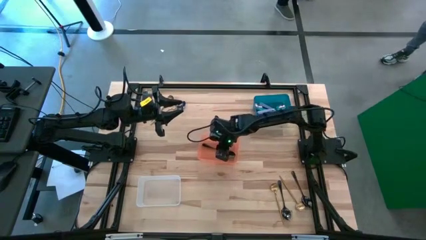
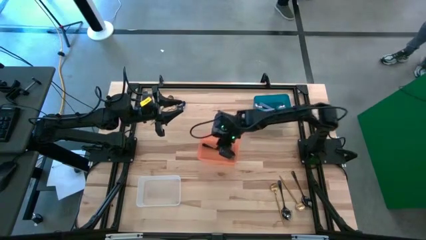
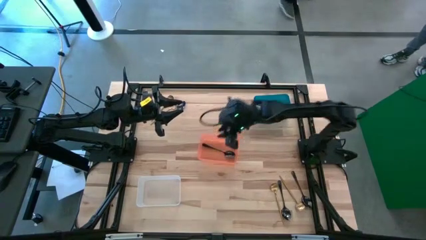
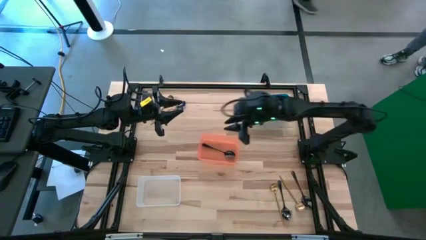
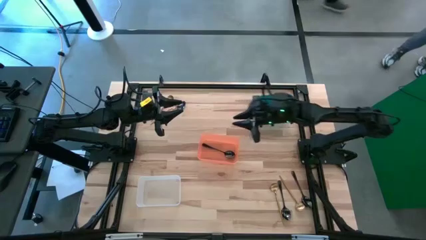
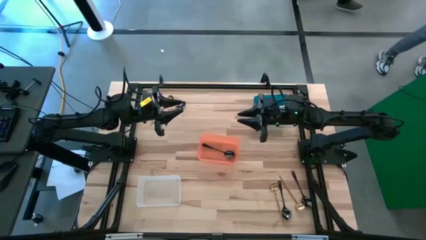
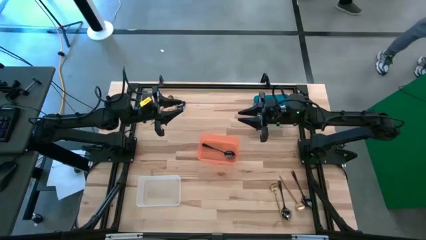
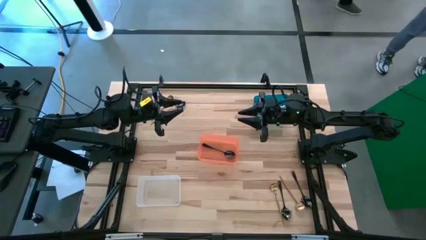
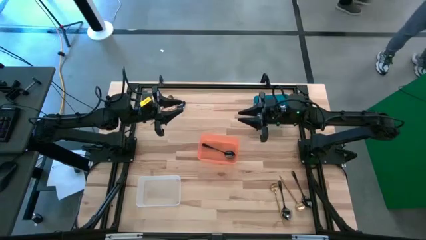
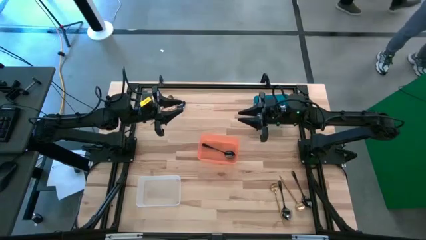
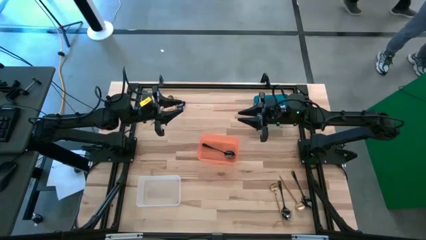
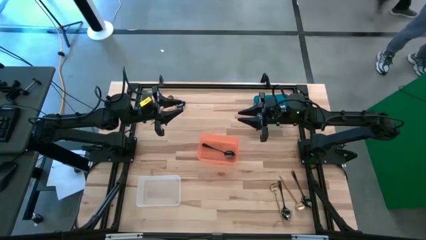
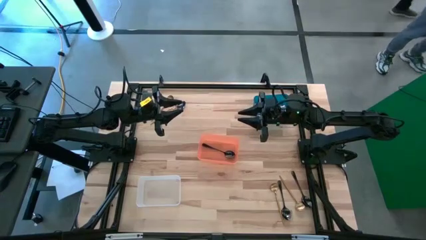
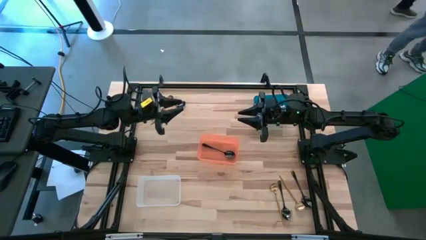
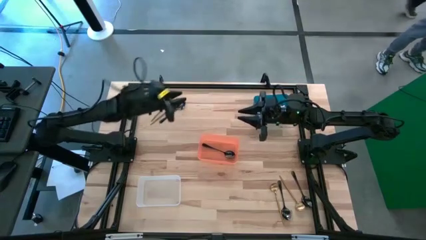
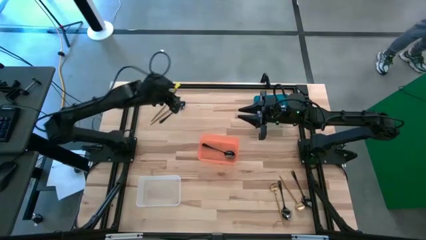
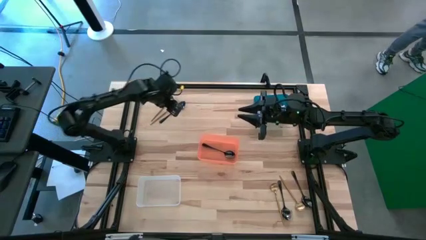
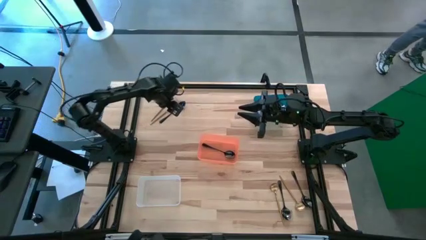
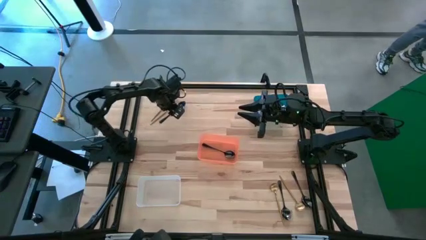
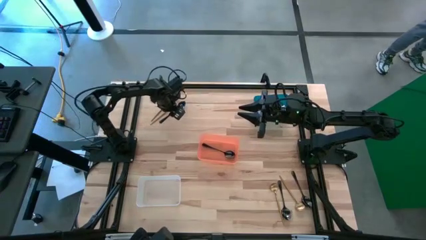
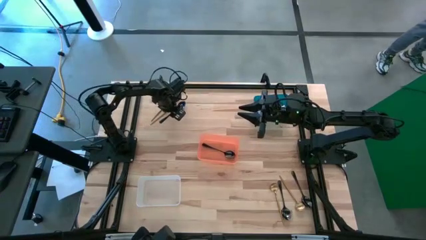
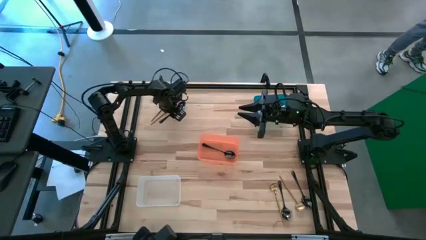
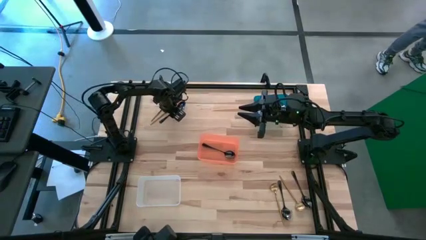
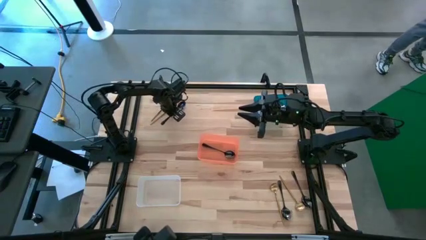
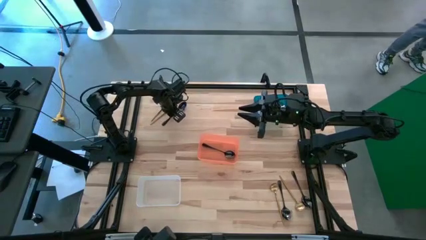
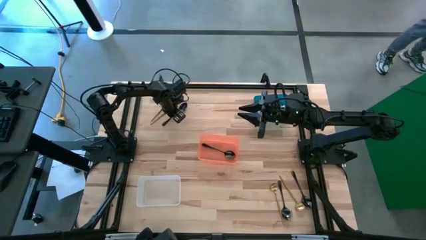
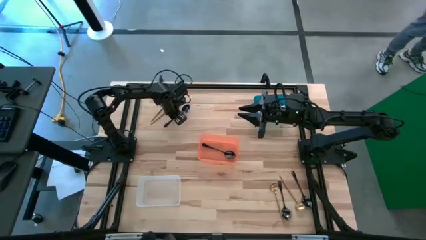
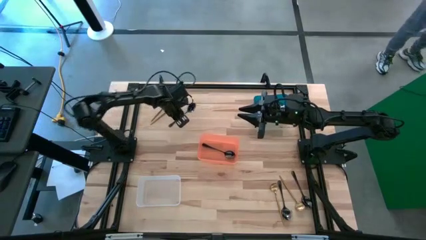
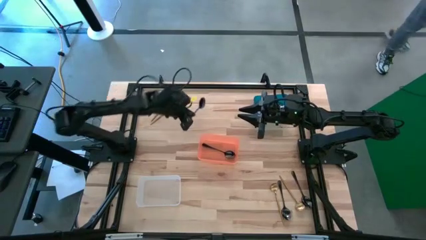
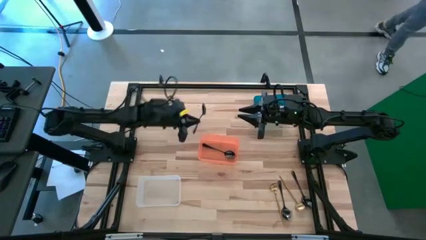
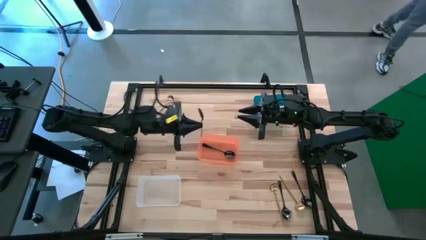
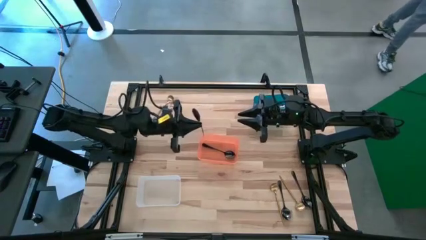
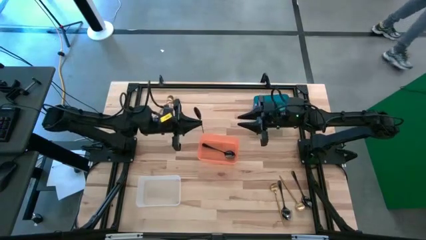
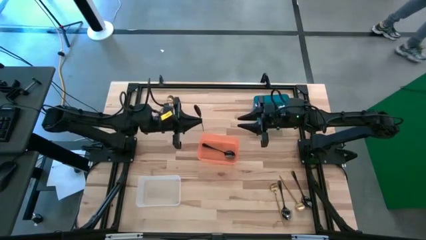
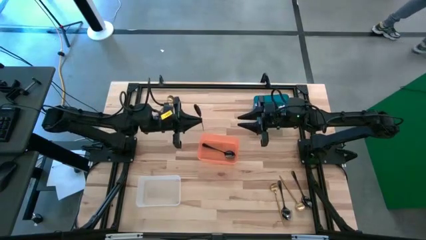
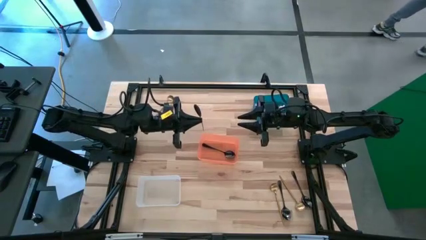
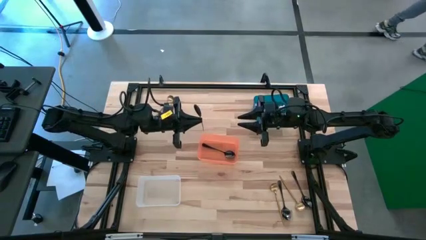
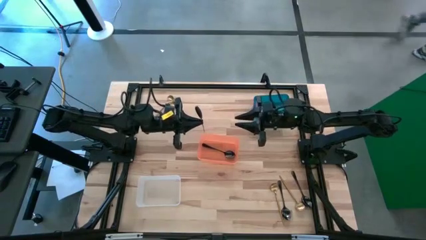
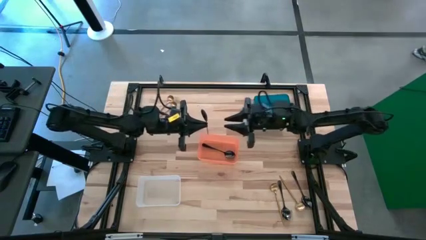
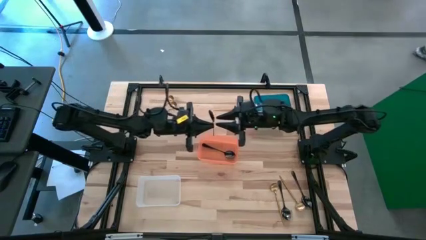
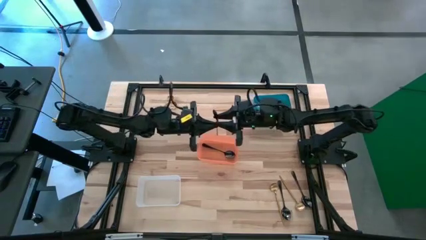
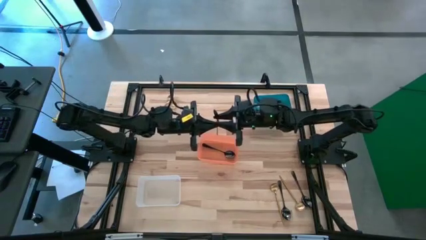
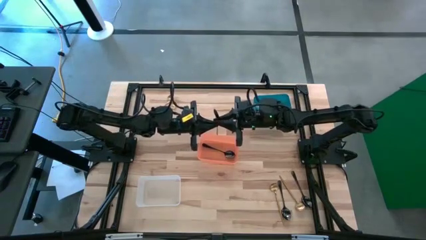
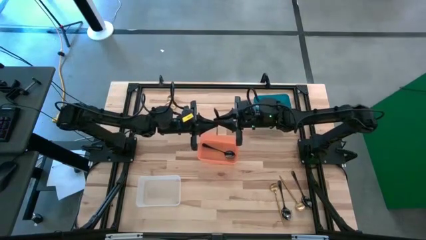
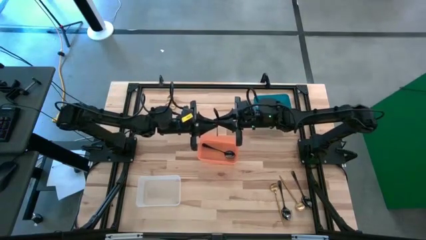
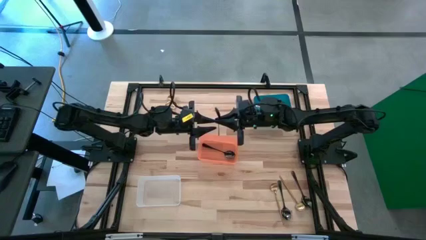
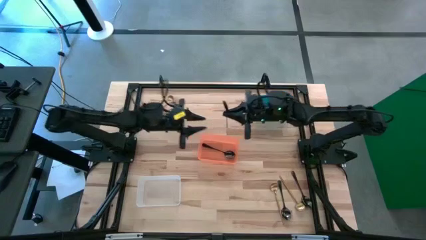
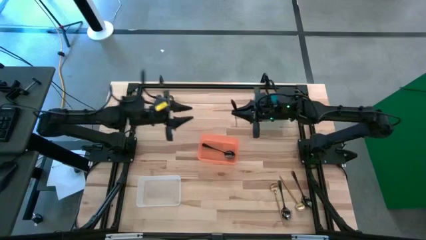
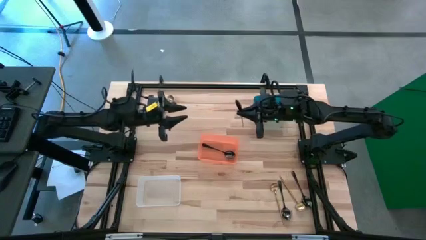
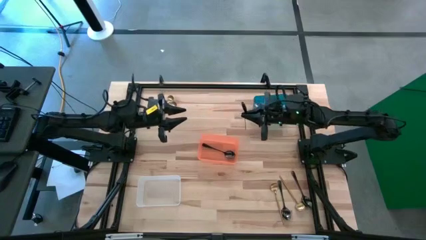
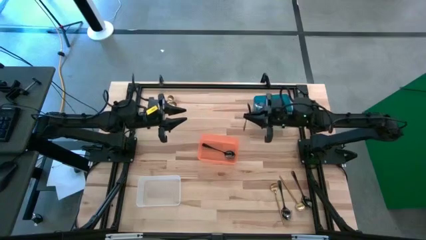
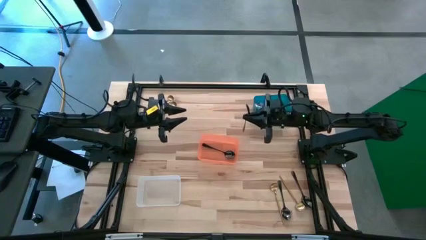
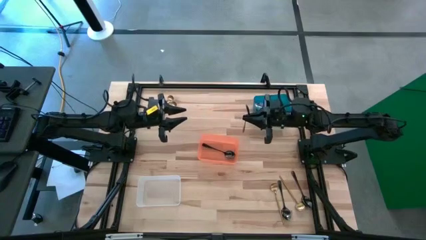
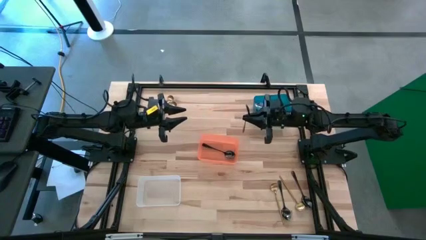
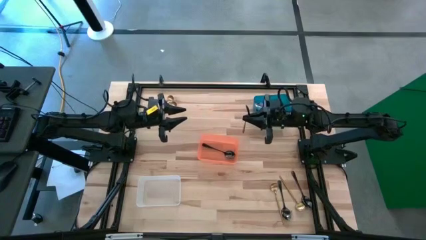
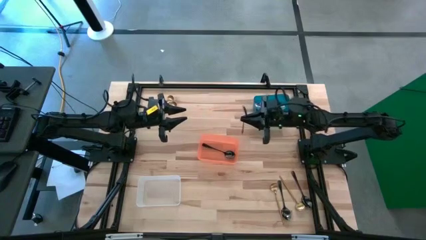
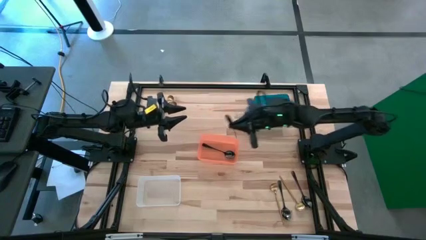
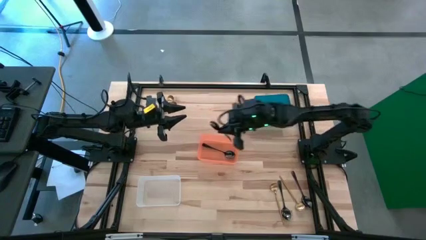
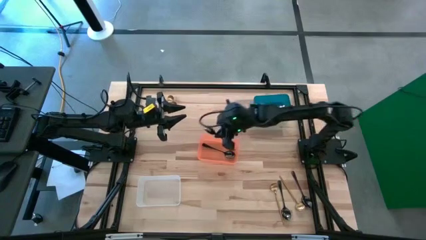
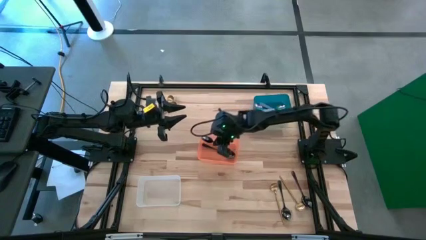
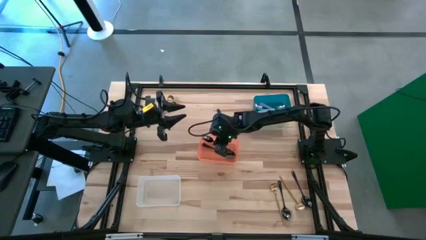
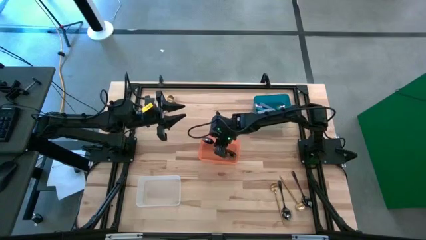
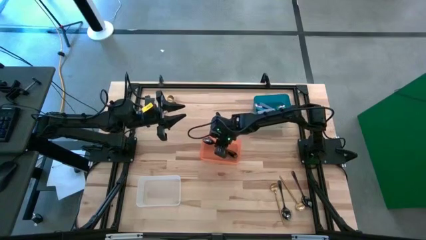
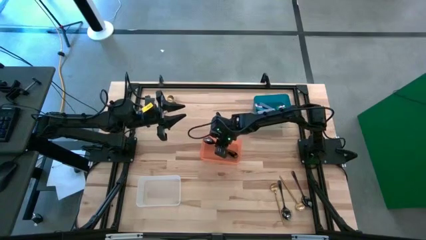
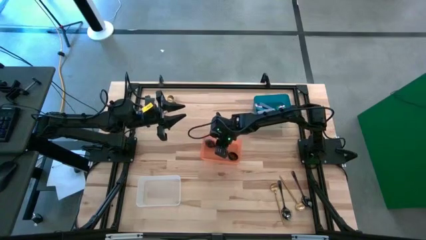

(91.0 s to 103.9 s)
Task: Sort silverware by color (type)
Put the top left black spoon into the orange bin

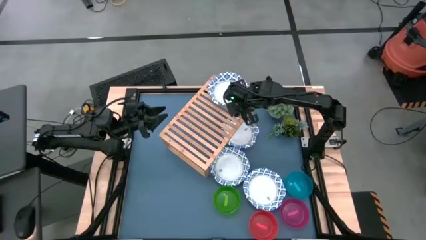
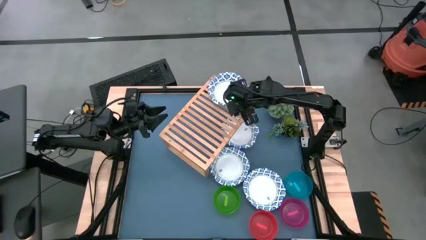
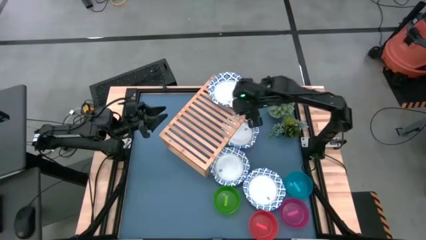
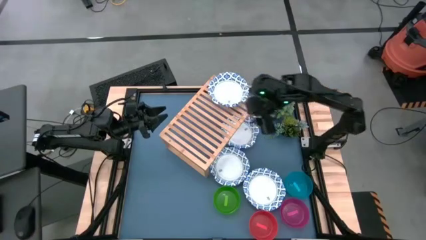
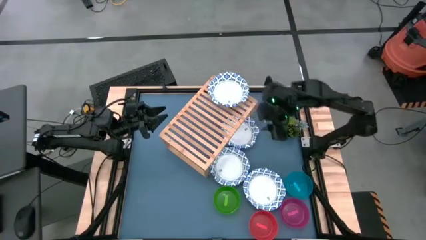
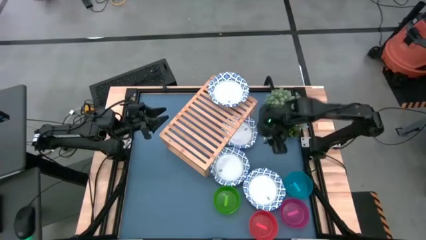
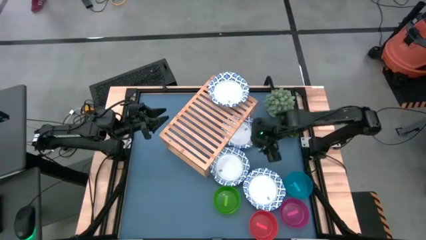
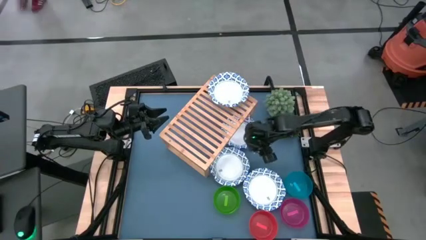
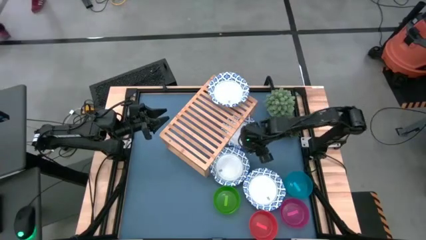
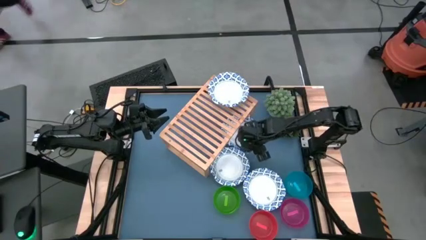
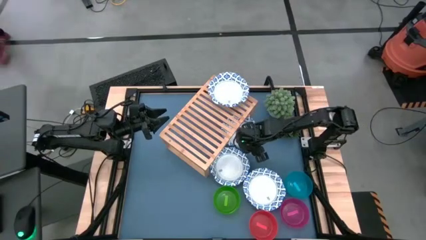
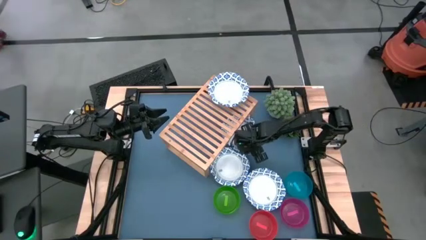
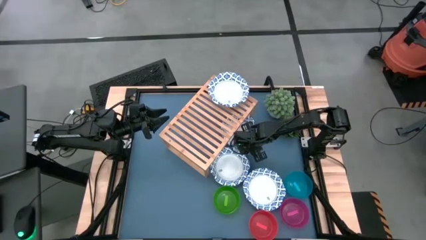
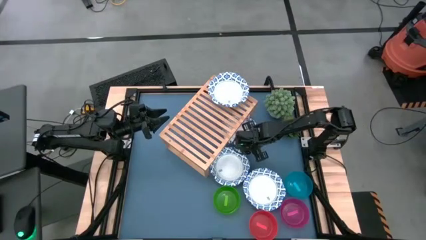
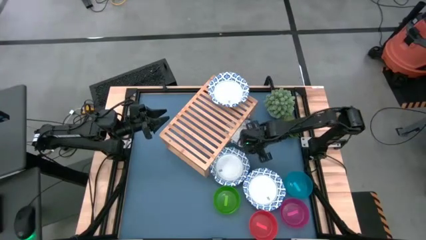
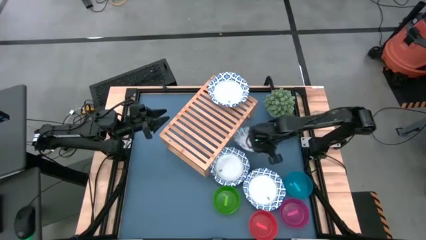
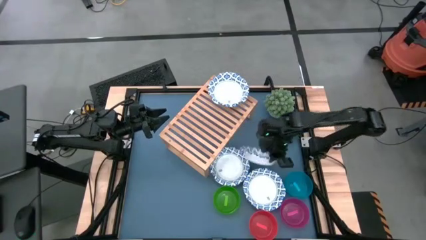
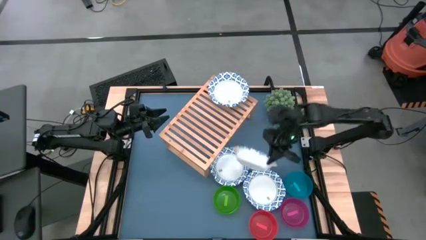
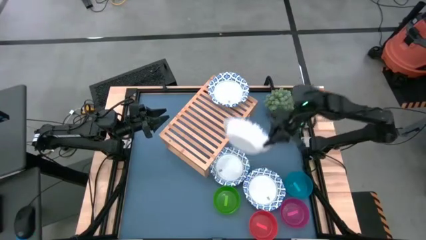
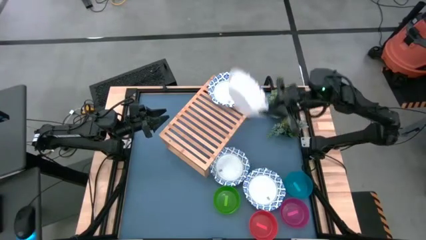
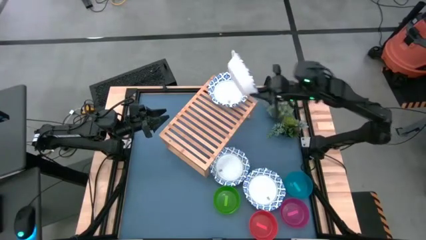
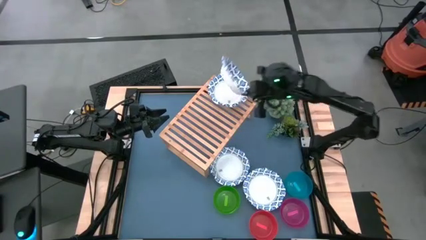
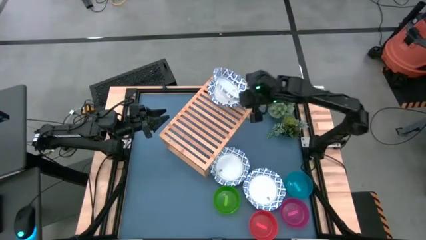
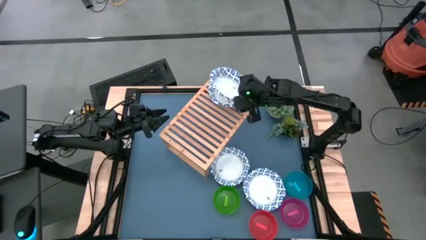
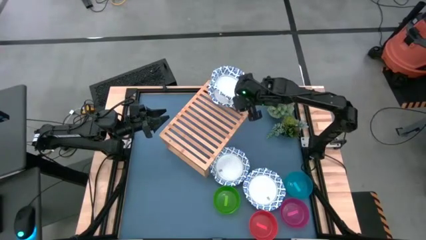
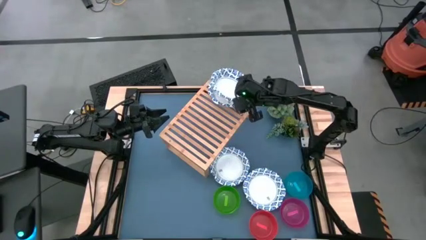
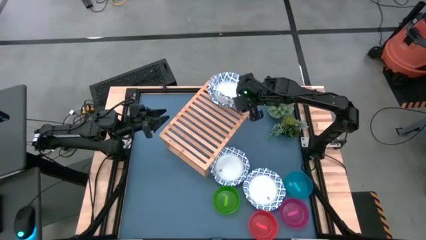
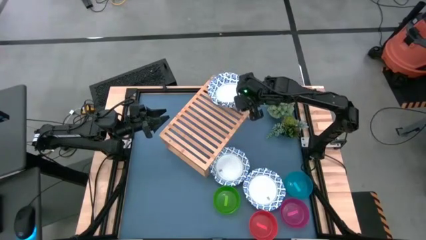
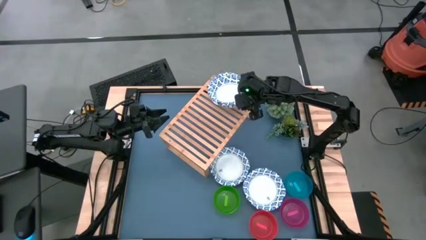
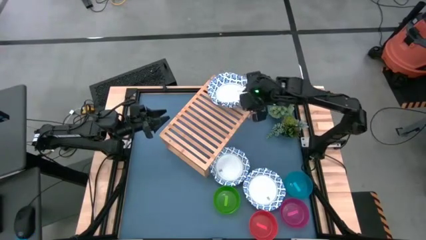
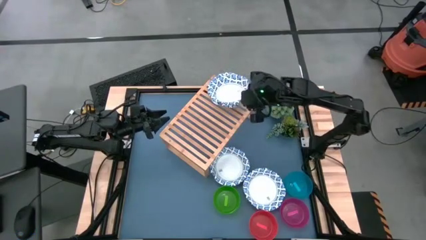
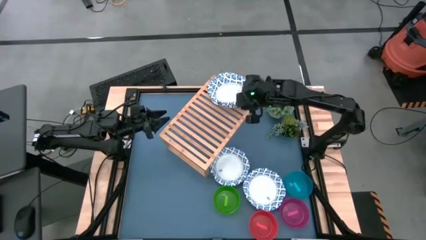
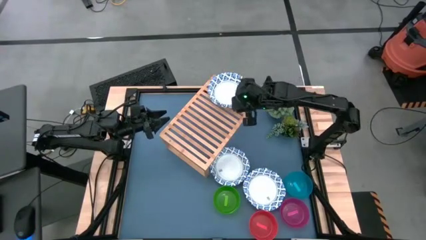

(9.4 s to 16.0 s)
Task: Place and stack bowls onto a shelf
Stack the white patterned bowl on top of the white patterned bowl on the shelf
